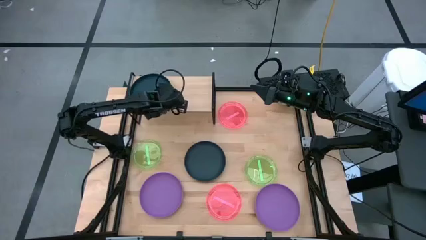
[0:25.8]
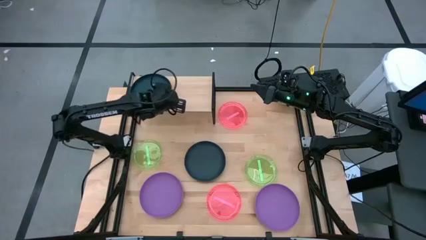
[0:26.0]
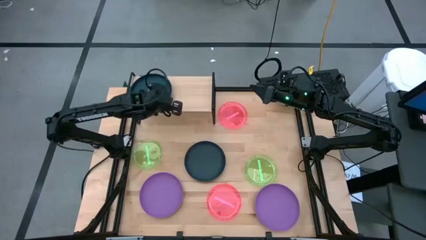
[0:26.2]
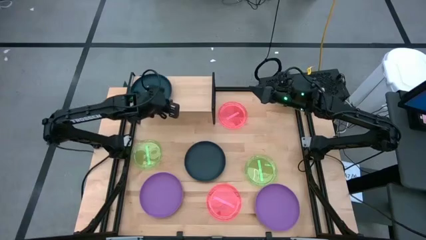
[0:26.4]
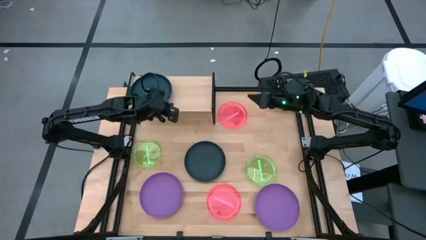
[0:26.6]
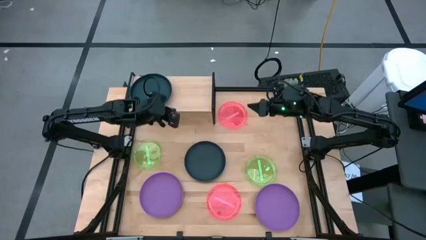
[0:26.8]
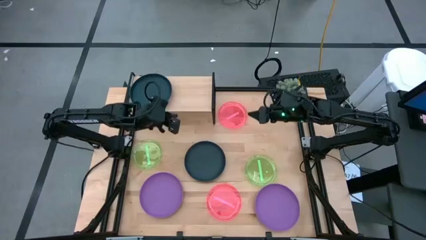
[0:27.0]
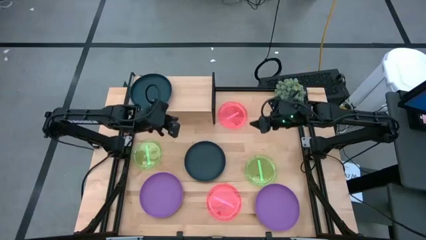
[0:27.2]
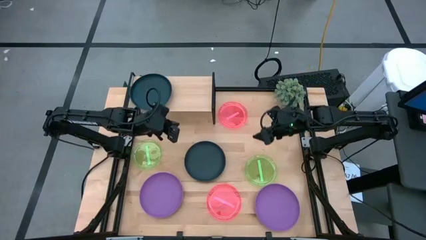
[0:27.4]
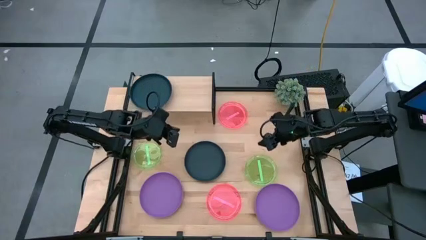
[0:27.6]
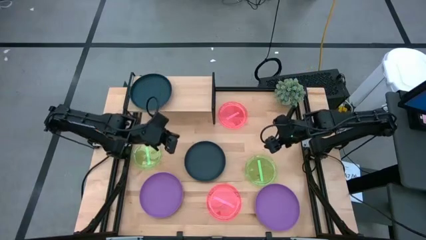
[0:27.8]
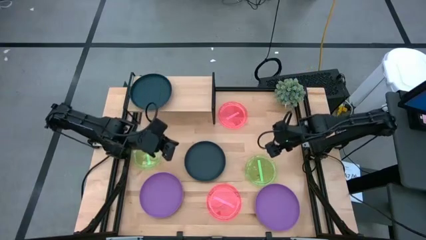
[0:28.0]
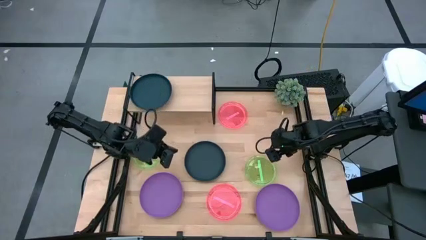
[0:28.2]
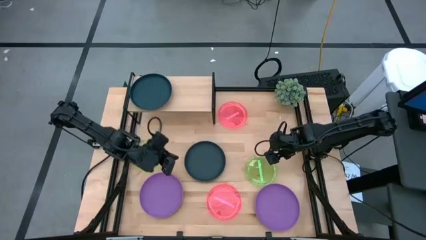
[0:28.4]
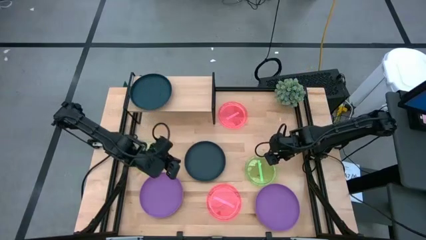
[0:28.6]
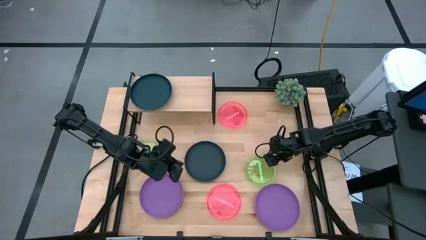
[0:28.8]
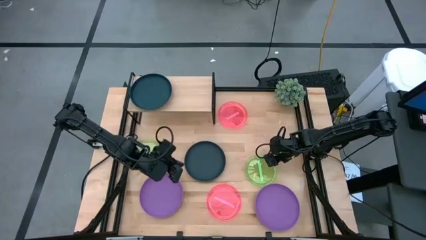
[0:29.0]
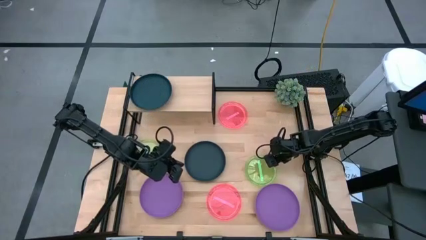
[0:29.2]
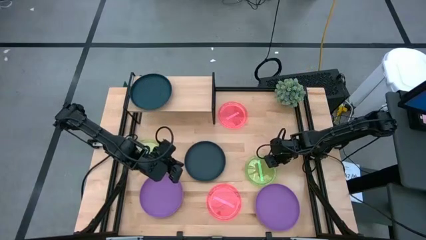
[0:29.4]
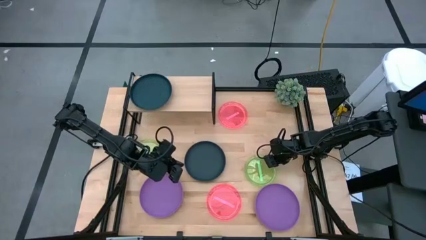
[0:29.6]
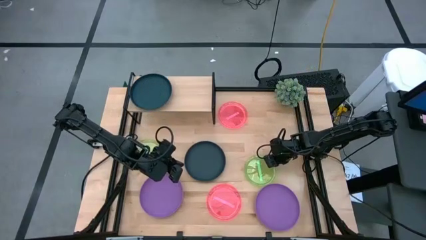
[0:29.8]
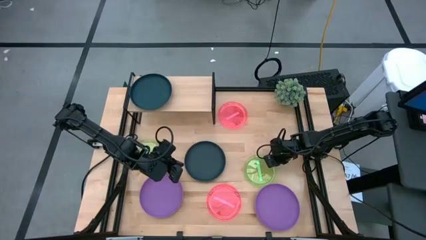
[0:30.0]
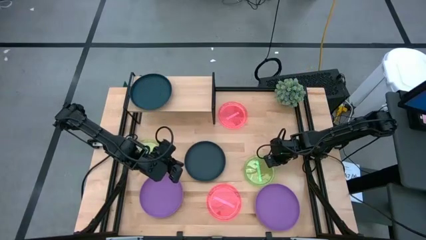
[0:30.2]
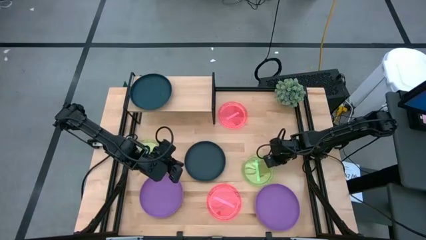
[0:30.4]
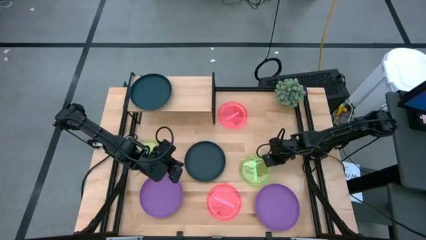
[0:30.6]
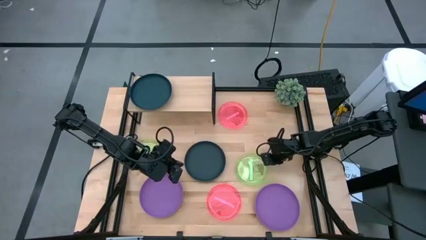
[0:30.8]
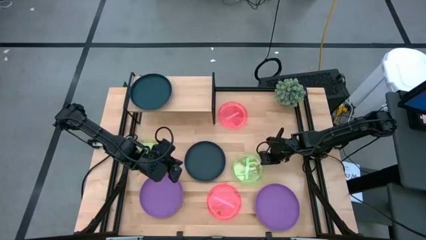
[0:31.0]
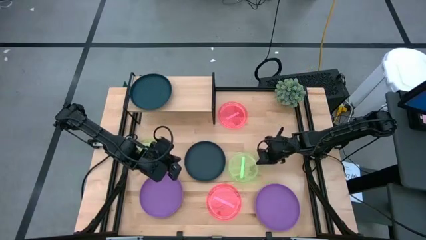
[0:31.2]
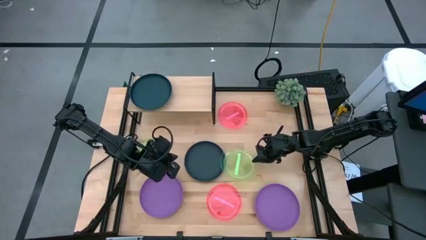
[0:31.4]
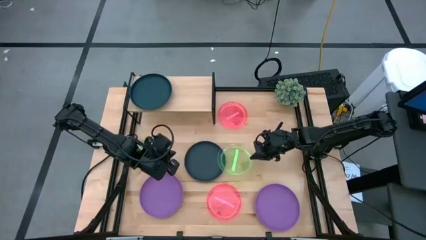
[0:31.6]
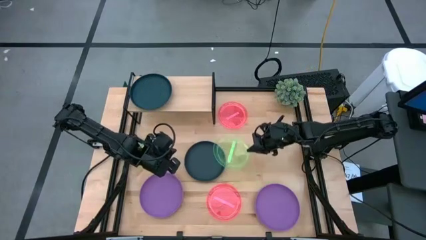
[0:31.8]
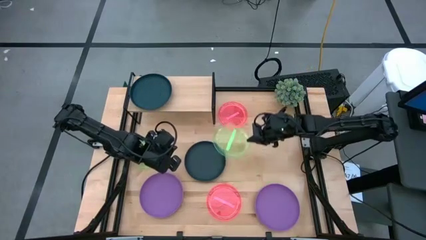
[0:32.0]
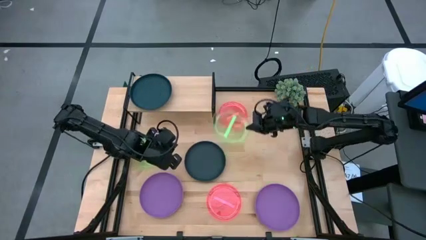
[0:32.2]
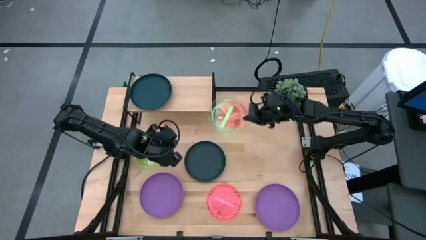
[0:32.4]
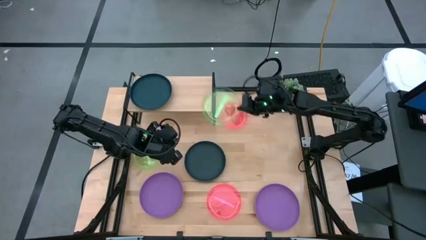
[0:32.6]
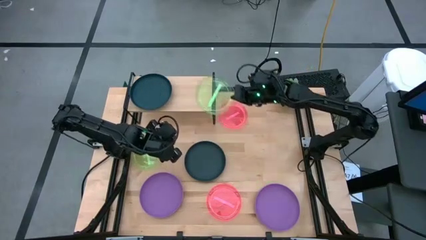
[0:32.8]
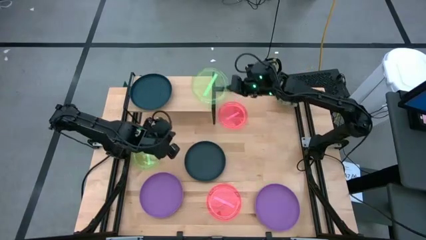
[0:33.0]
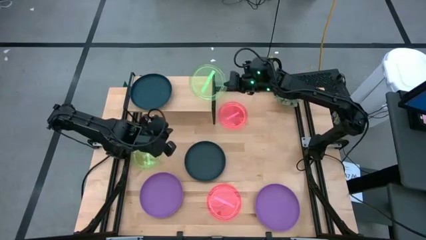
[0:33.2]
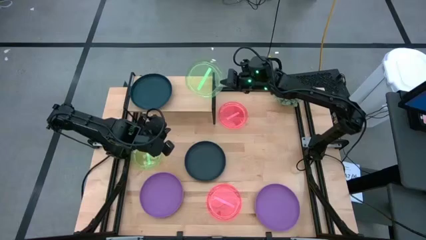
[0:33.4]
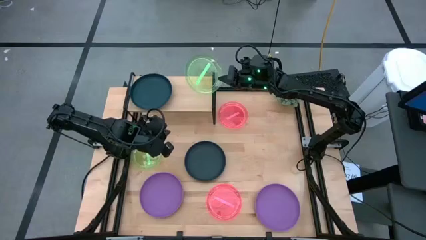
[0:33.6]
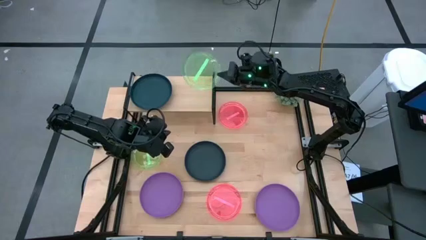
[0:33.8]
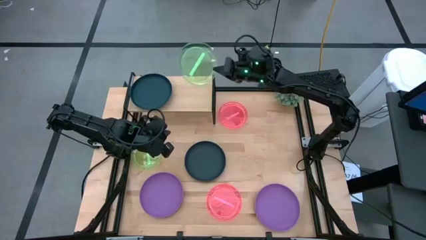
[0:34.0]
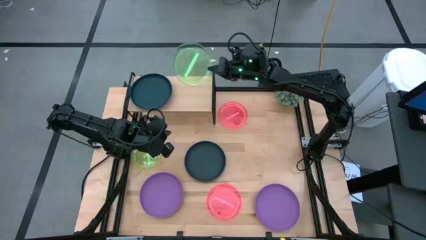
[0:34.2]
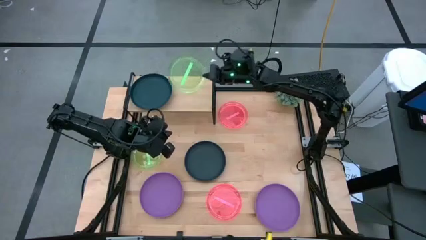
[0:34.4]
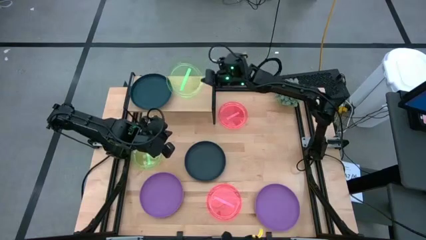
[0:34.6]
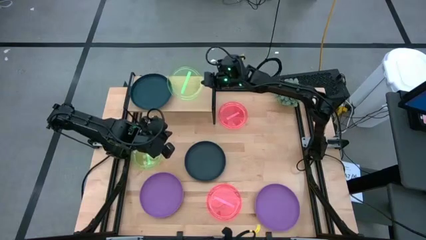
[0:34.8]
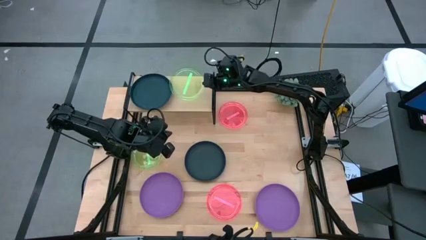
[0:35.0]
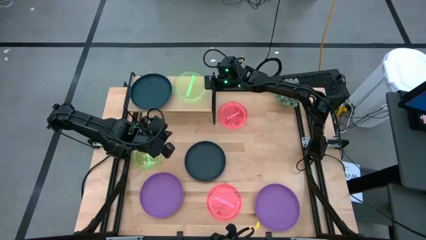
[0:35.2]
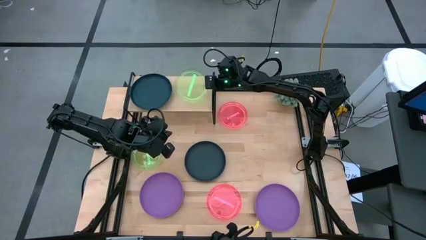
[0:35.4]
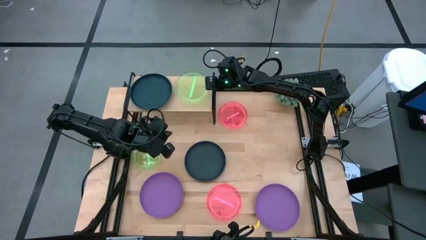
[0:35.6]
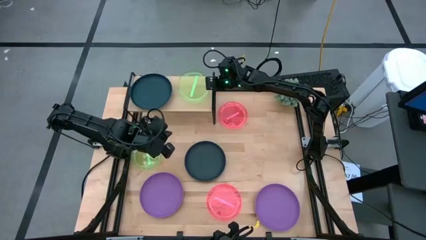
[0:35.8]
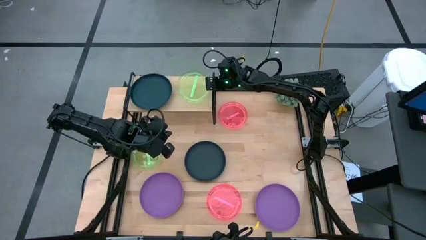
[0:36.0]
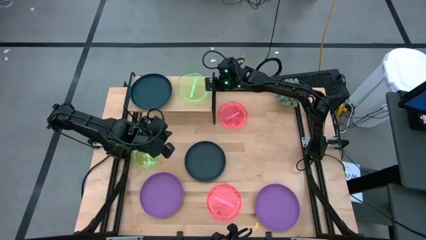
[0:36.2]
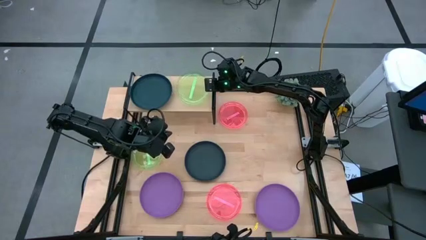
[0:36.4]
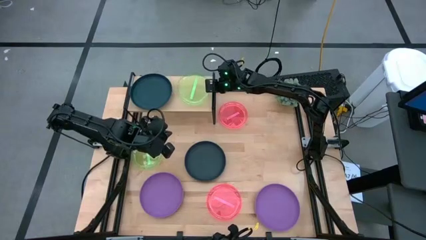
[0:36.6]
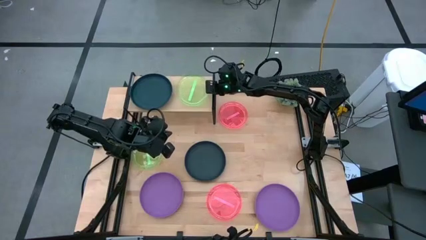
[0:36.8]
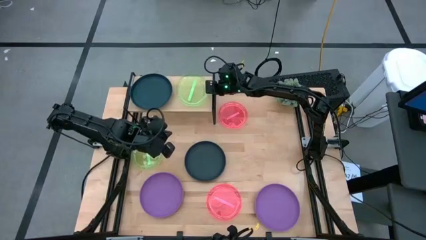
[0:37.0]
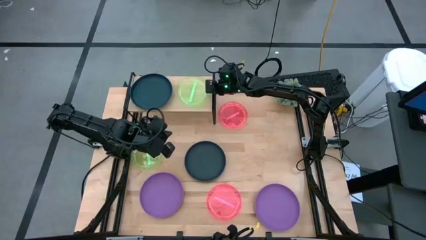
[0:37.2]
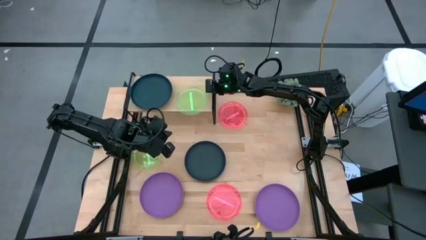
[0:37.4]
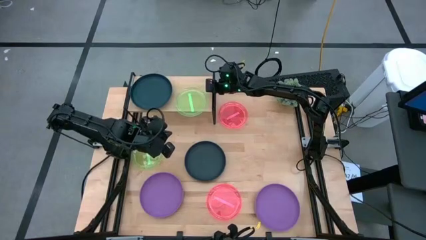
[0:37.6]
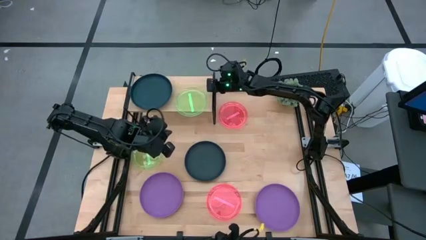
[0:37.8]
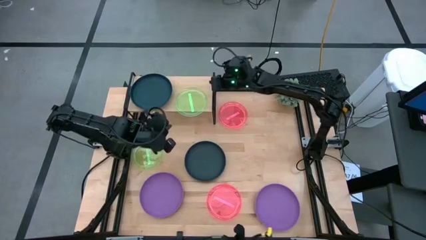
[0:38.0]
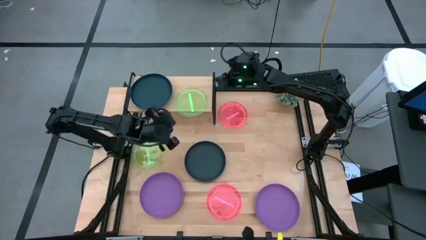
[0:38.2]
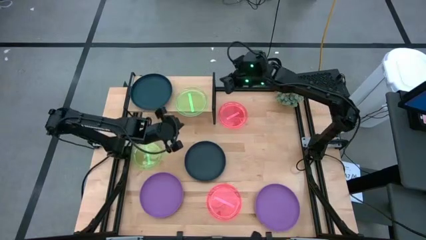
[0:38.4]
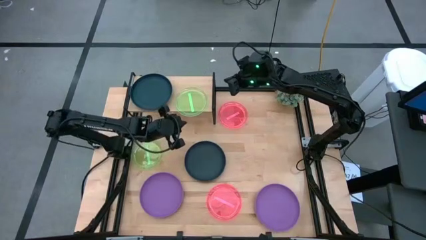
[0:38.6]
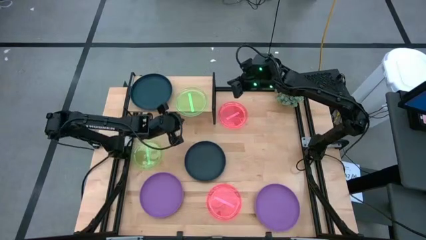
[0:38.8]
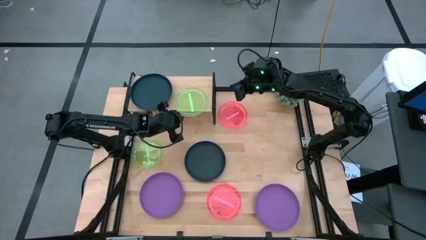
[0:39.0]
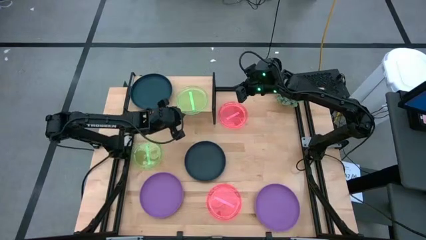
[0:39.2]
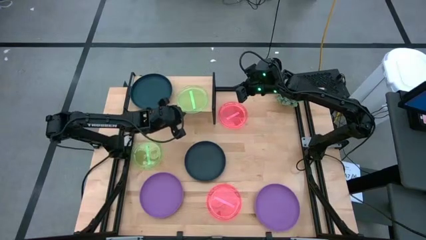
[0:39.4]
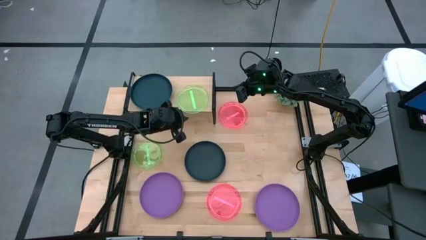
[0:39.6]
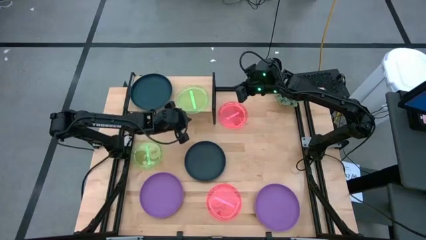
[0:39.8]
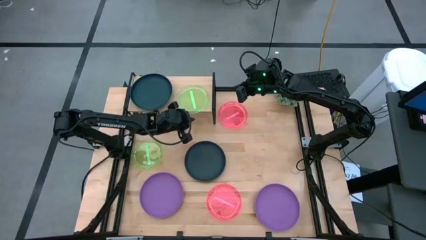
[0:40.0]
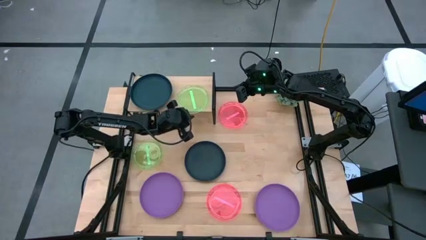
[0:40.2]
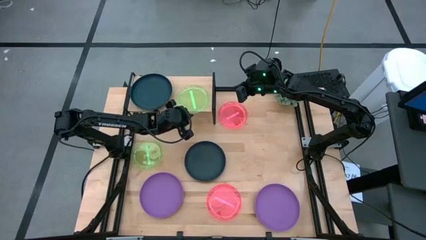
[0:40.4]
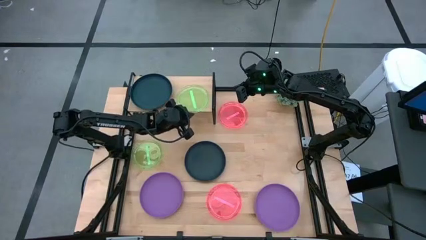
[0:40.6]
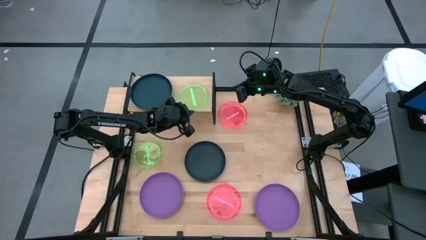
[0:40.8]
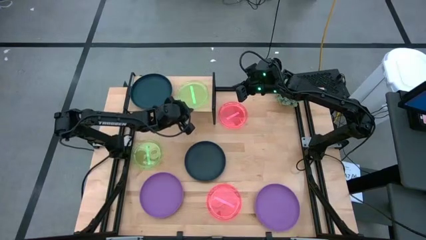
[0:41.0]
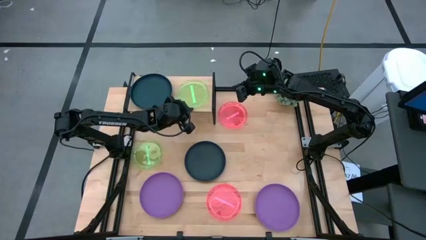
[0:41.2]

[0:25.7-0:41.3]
Task: Place and stack plates onto a shelf
Put the right green plate on the shelf

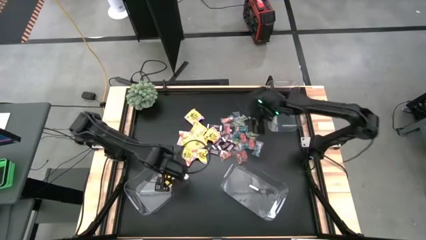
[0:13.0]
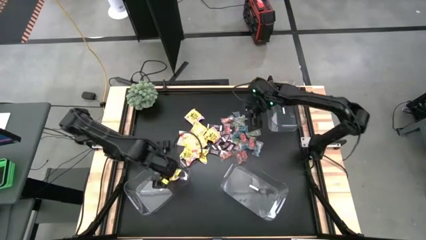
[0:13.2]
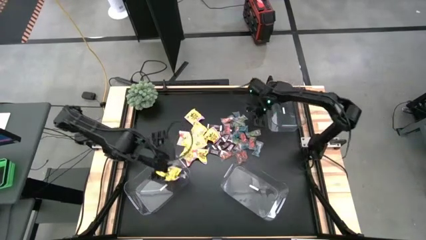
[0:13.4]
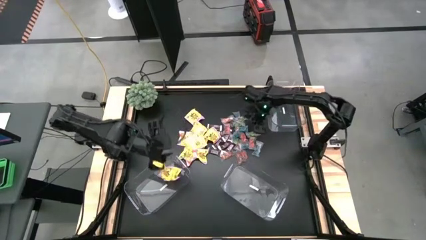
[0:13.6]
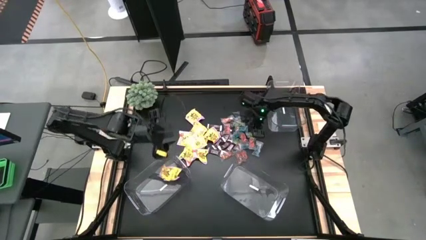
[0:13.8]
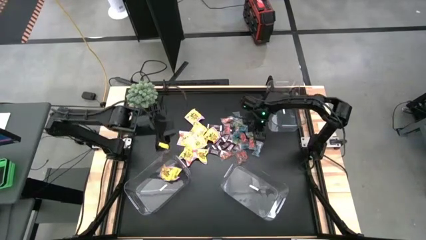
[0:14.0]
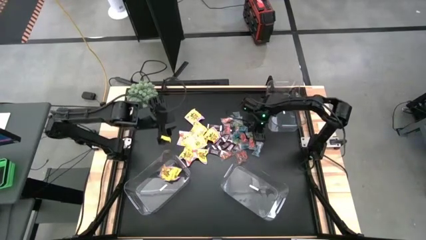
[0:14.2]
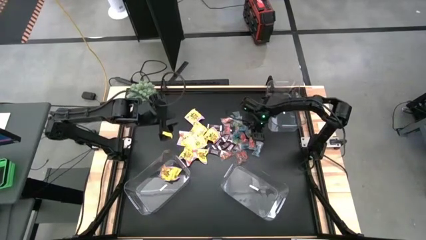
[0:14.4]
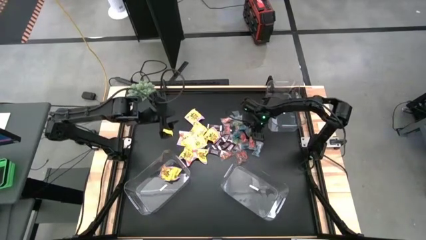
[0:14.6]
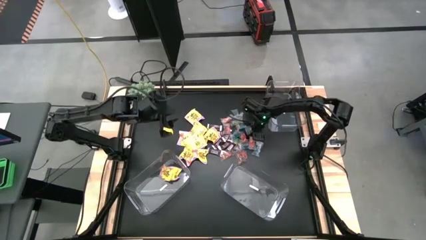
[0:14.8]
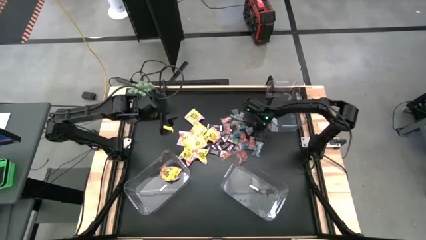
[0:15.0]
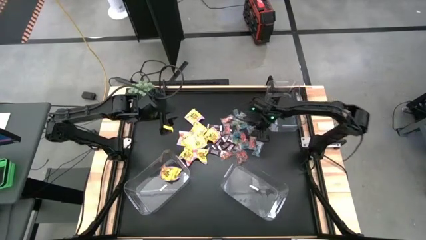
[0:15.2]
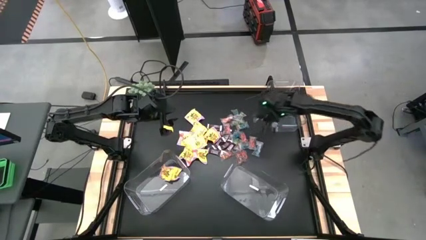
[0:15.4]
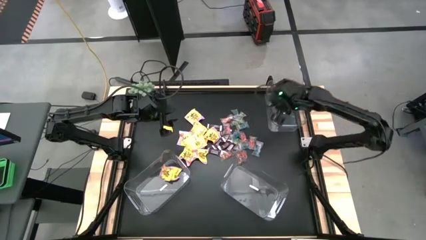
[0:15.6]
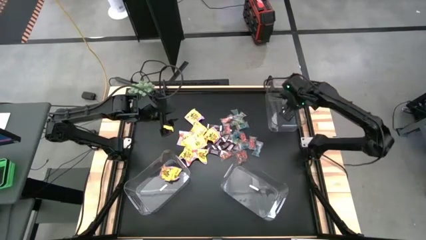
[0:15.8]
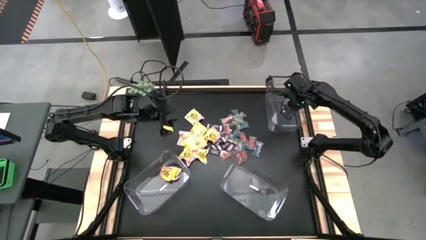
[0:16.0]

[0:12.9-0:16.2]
Task: Sort candy
Put the green candy in the top right transparent container
